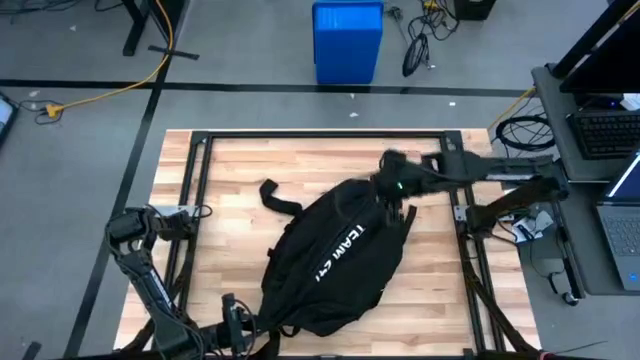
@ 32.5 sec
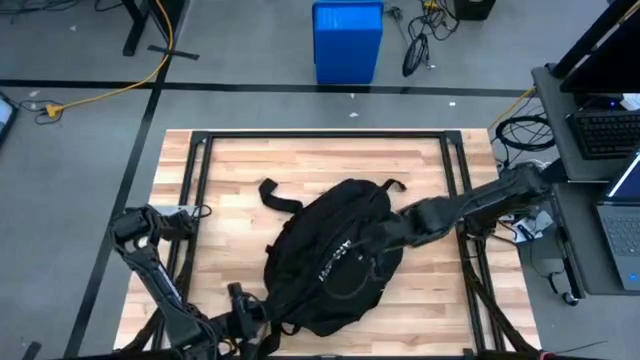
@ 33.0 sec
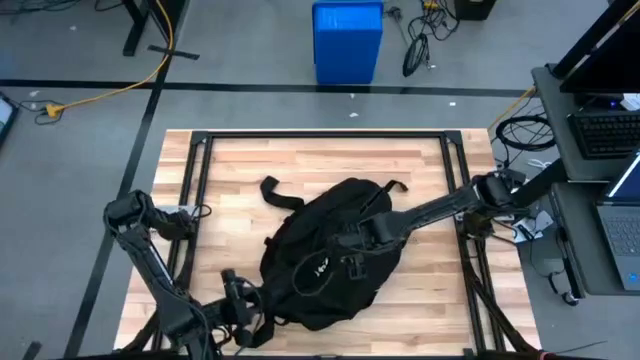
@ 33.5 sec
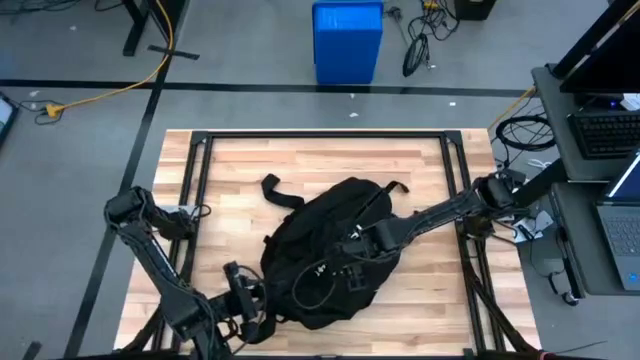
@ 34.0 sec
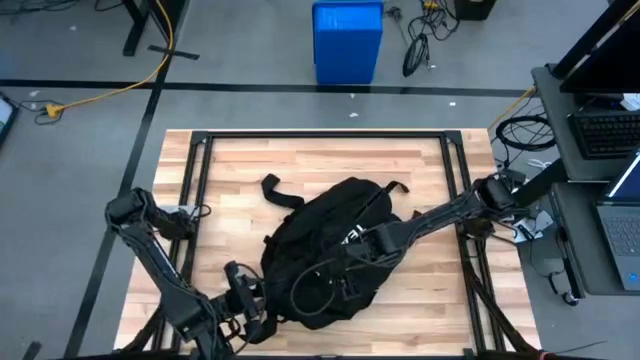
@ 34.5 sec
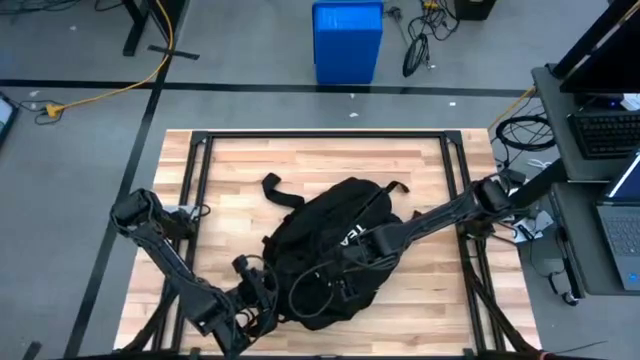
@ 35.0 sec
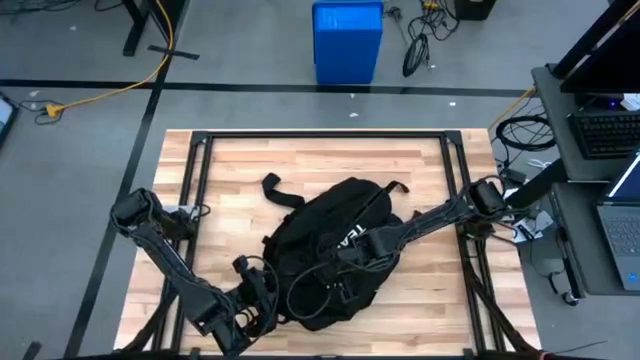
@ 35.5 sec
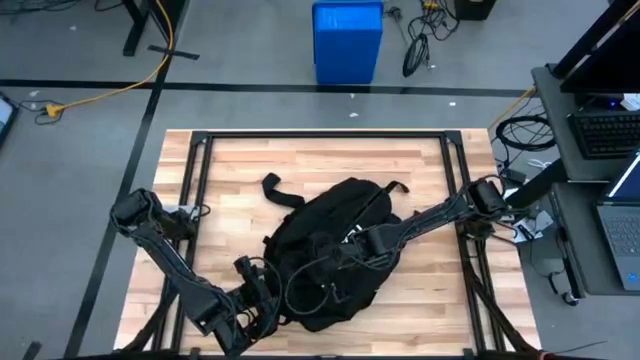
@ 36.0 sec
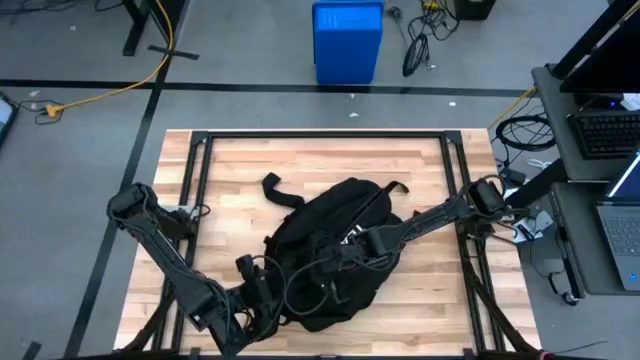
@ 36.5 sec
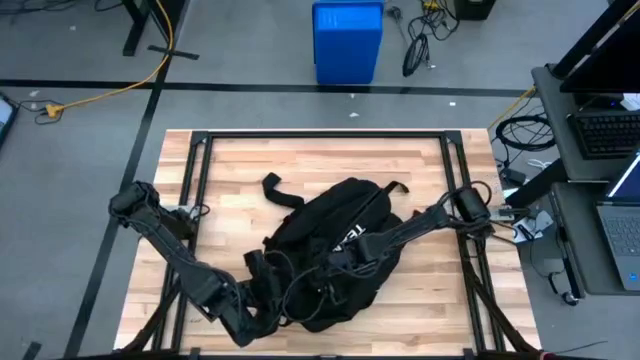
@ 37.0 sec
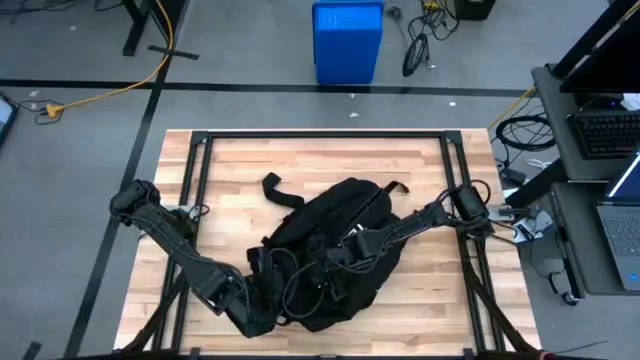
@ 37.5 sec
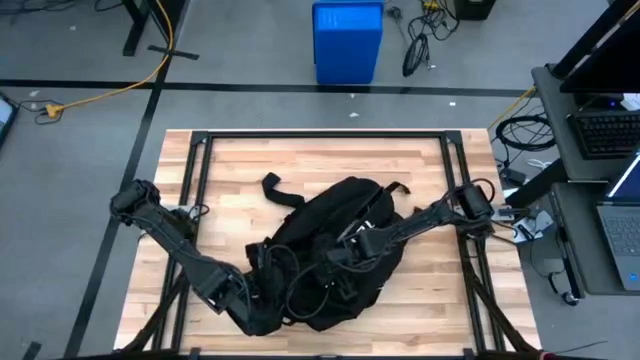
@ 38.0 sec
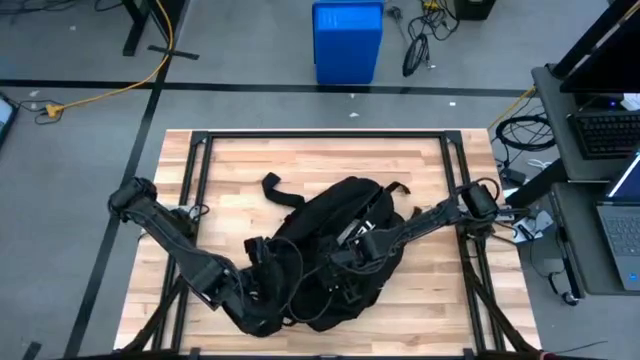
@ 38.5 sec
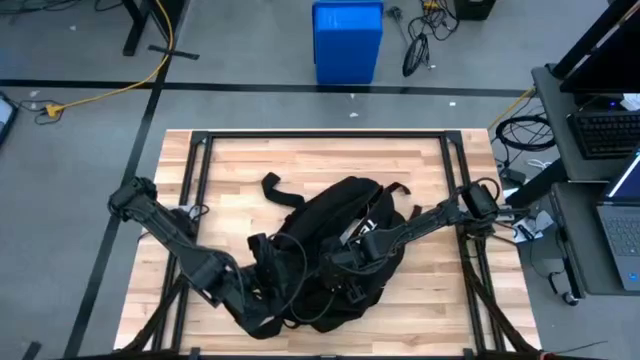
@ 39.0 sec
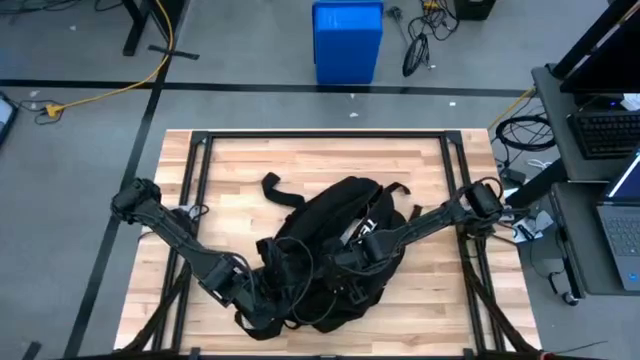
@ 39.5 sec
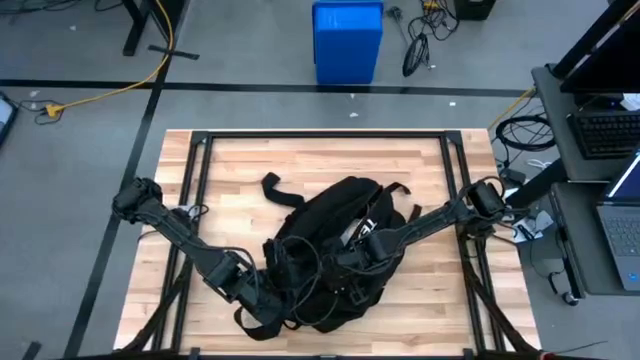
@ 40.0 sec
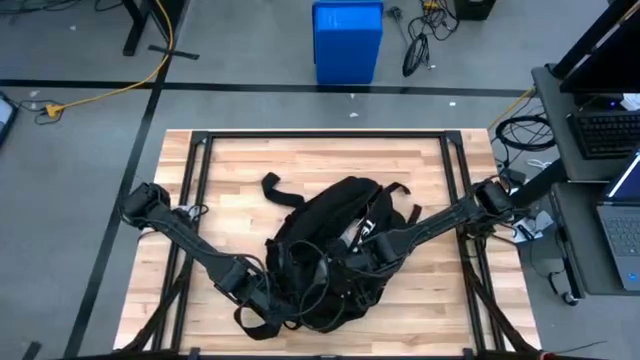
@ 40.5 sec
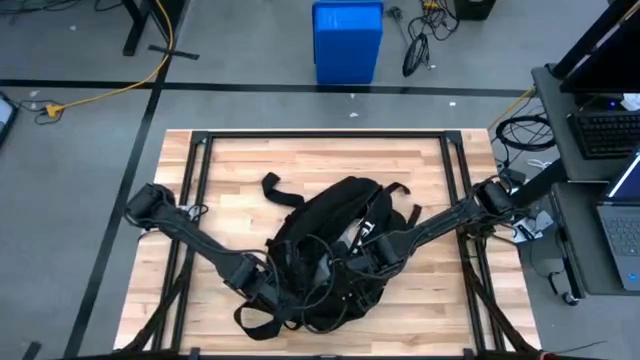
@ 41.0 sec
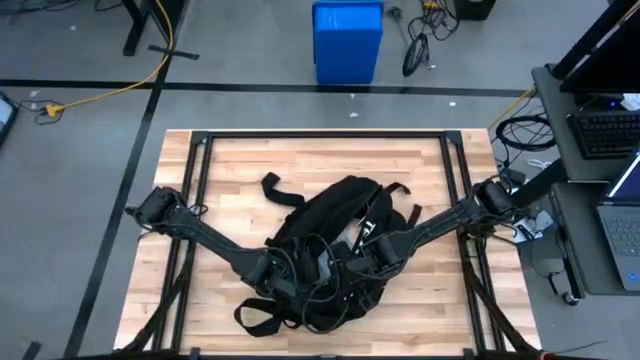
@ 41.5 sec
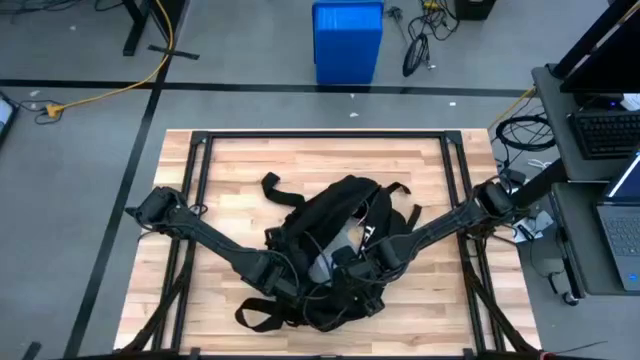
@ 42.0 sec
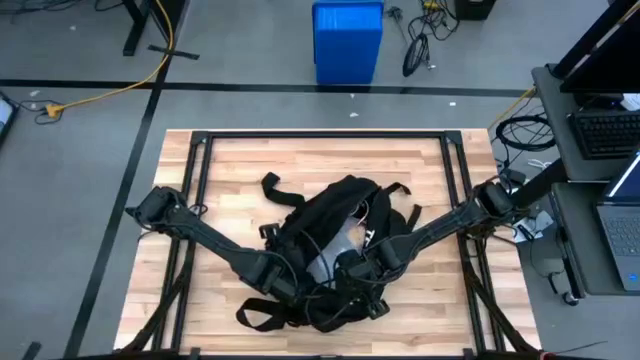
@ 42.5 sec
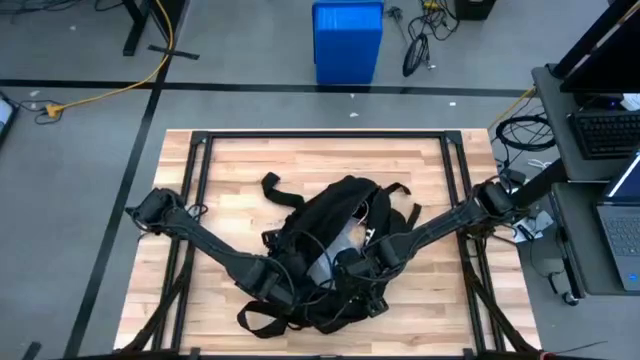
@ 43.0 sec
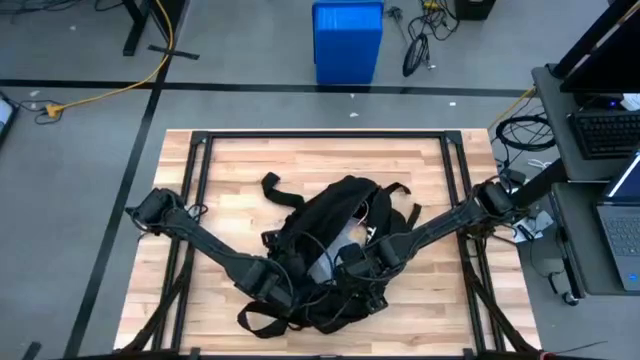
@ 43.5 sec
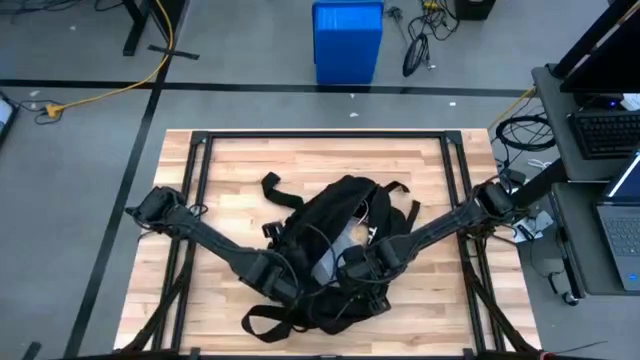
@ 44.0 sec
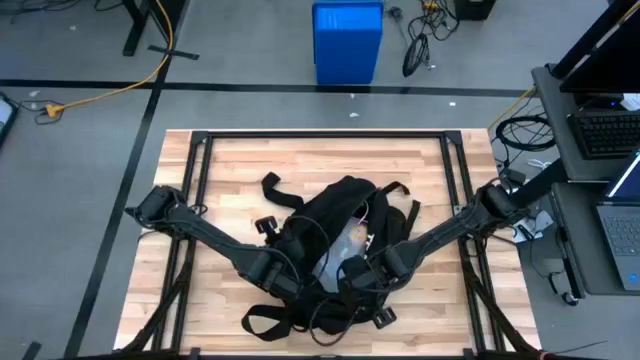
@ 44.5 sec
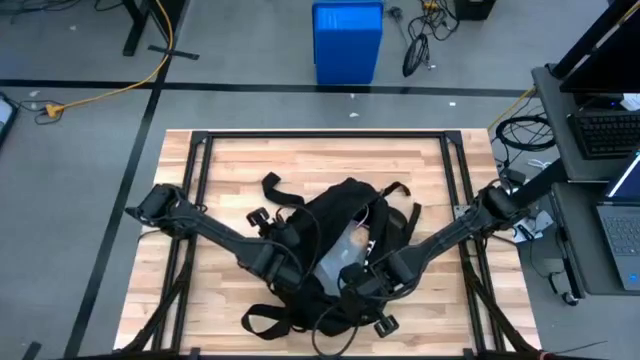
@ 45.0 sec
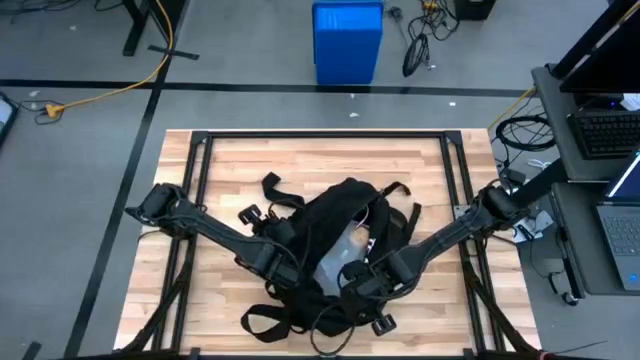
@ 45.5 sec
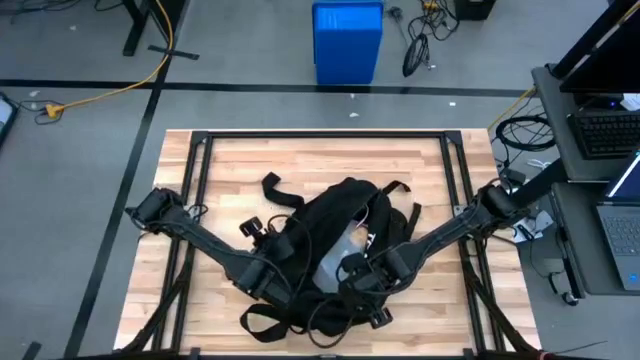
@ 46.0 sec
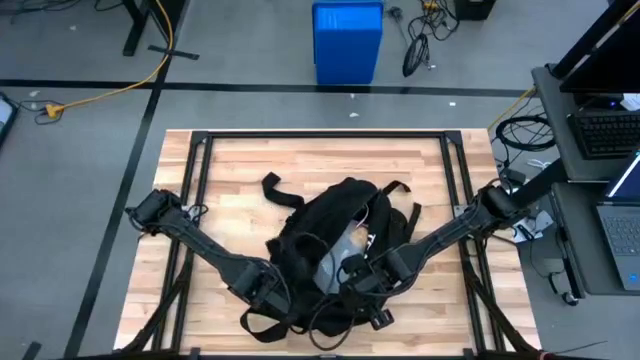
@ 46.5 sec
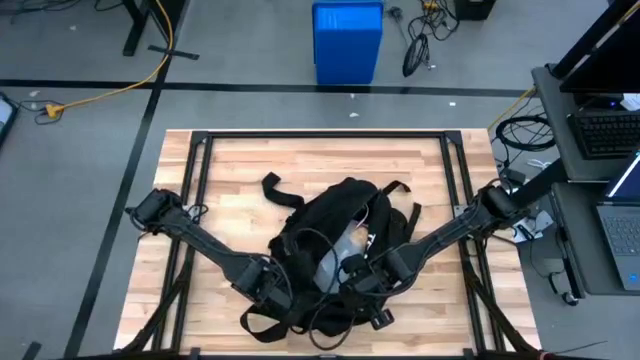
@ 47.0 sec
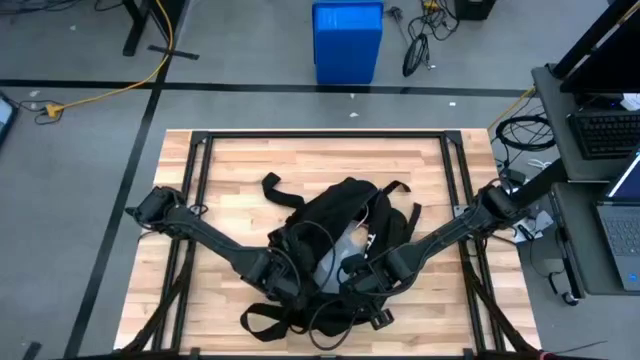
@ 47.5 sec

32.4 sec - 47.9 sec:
Task: Unpack backpack
Remove the charger cable from the black backpack

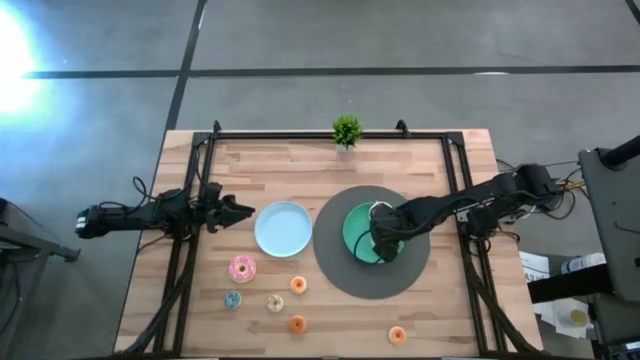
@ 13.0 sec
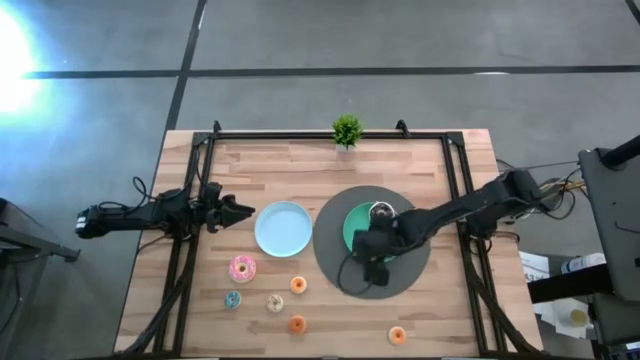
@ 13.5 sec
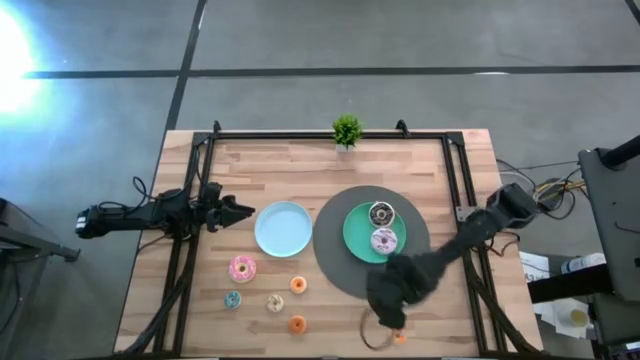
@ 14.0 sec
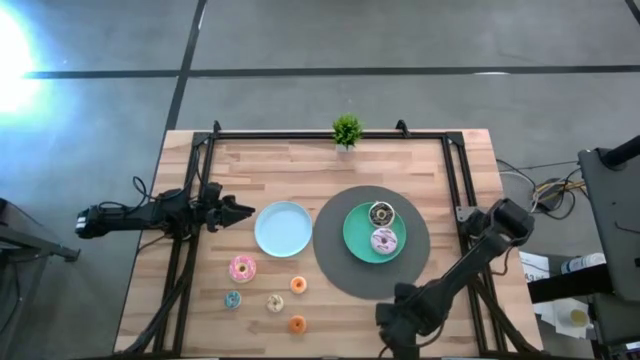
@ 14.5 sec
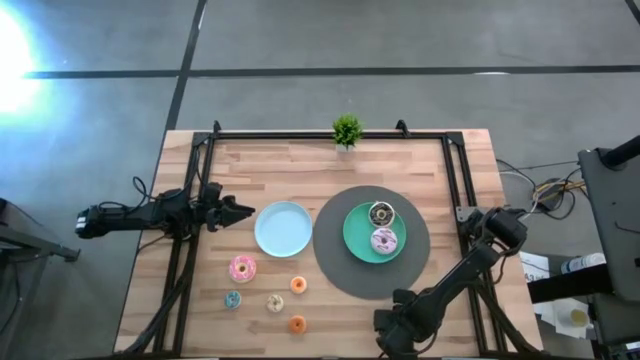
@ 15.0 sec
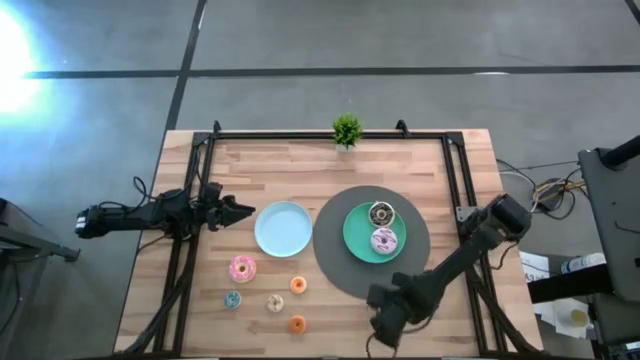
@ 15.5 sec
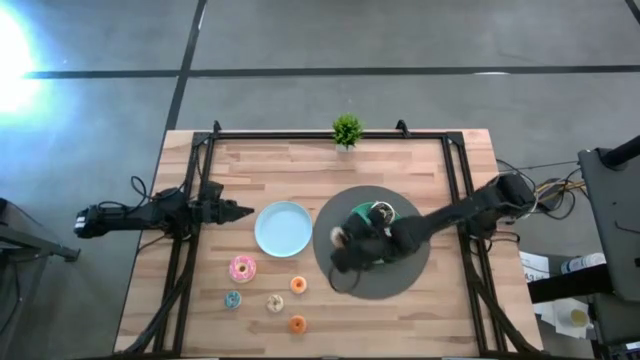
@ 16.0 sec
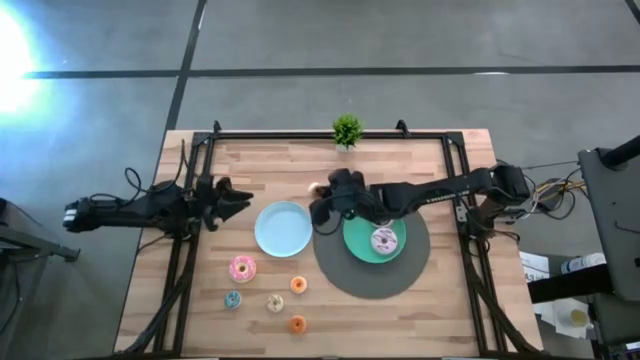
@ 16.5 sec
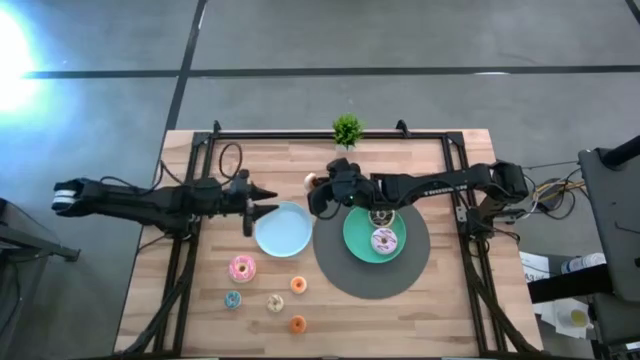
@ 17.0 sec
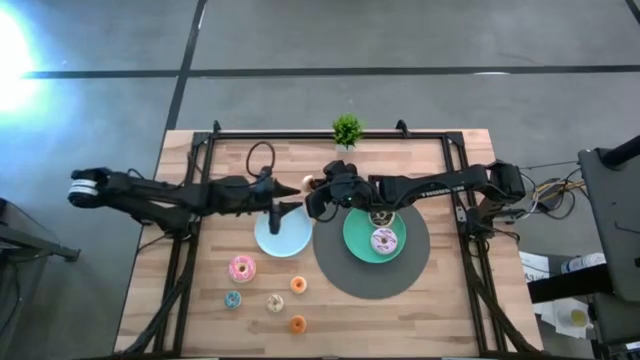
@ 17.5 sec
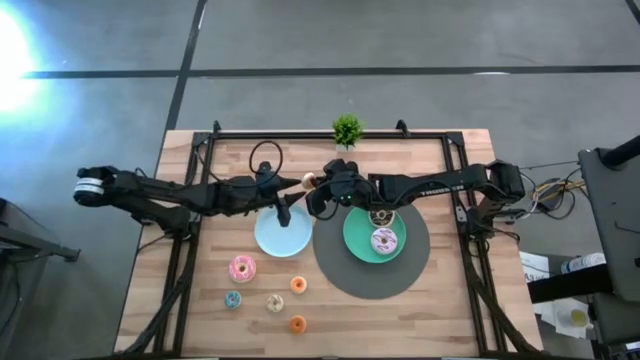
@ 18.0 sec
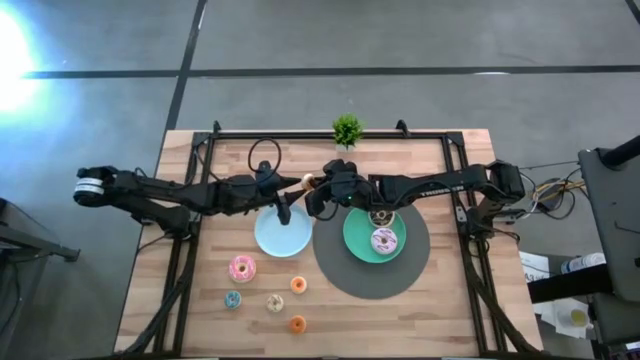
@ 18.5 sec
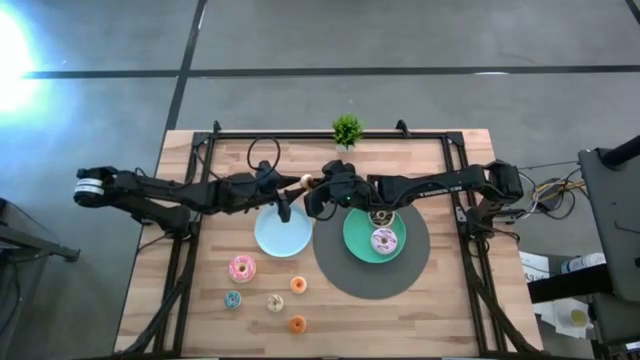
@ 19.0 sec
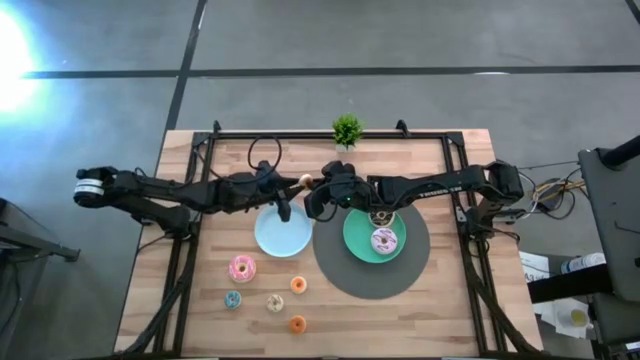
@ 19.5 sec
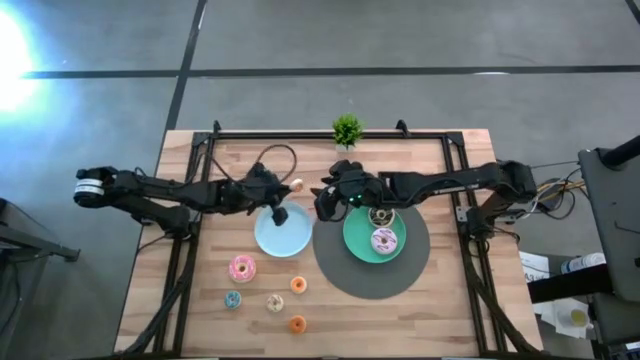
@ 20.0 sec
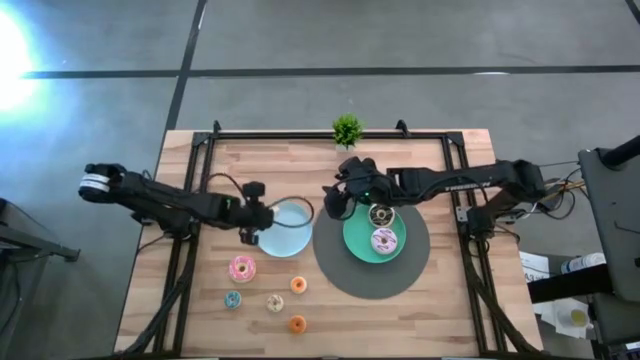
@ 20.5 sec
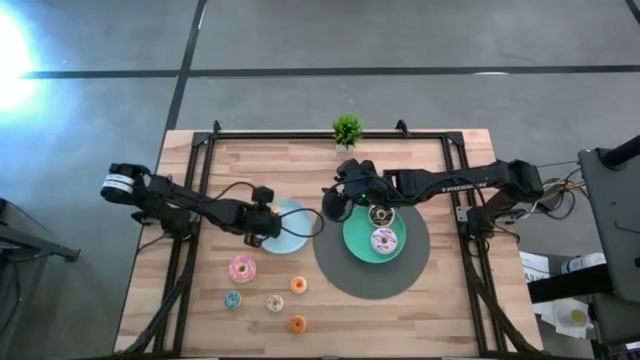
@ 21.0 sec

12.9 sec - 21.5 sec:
Task: Pick & Place donuts
Put the small yellow donut on the blue plate
